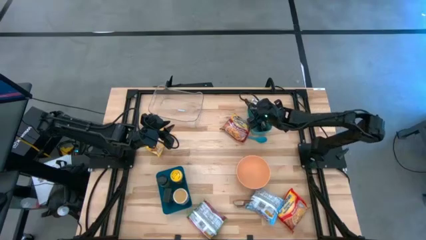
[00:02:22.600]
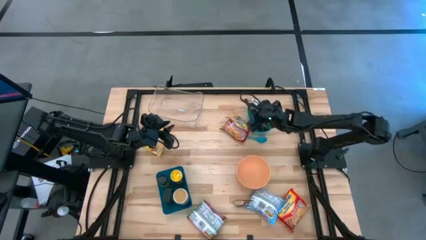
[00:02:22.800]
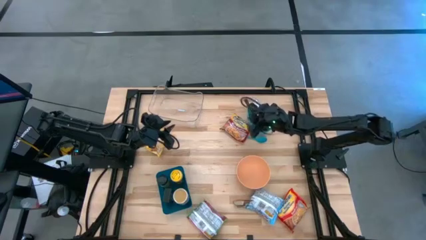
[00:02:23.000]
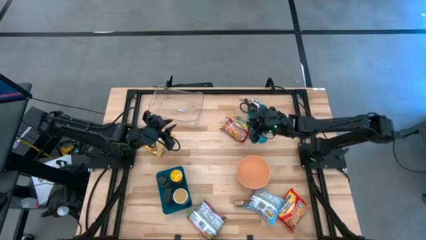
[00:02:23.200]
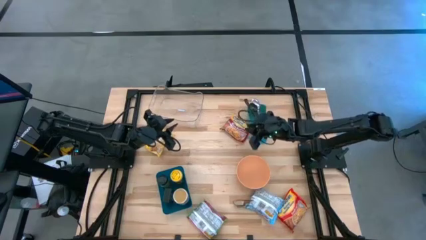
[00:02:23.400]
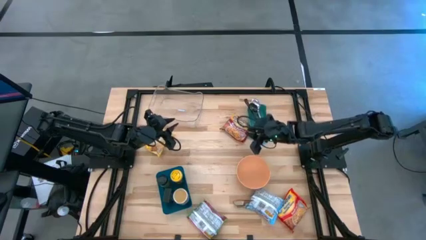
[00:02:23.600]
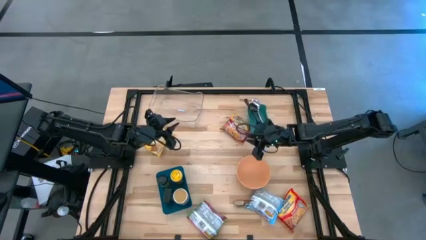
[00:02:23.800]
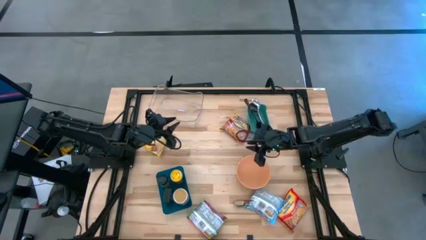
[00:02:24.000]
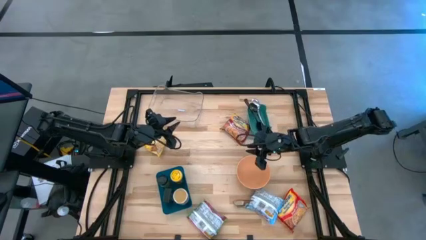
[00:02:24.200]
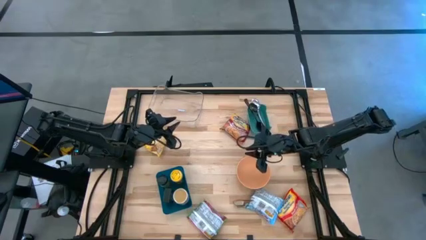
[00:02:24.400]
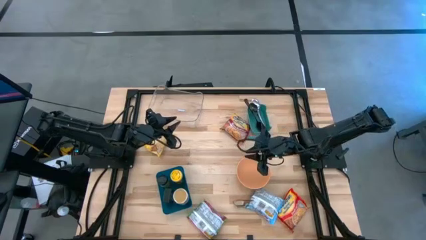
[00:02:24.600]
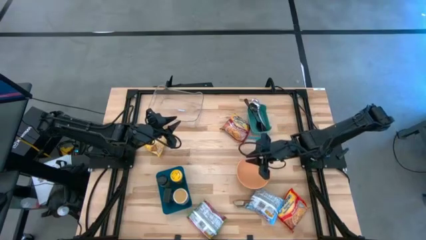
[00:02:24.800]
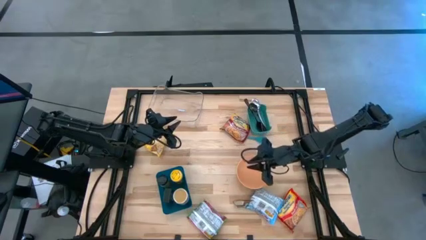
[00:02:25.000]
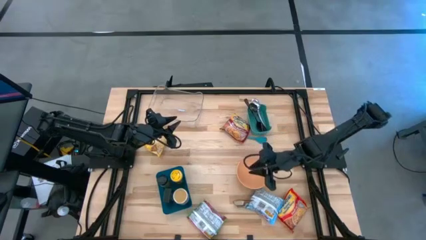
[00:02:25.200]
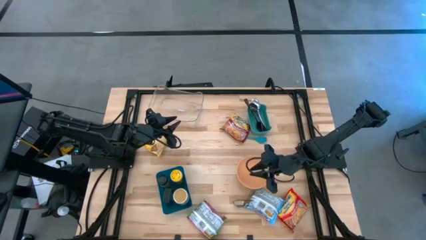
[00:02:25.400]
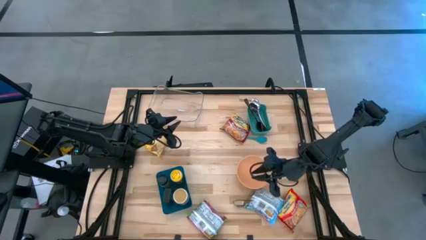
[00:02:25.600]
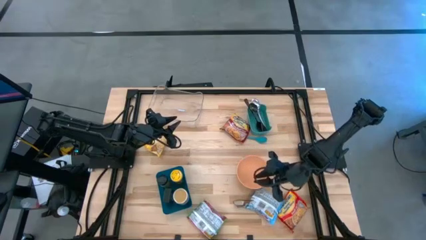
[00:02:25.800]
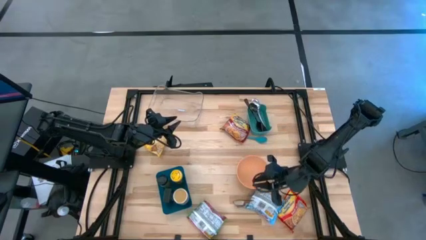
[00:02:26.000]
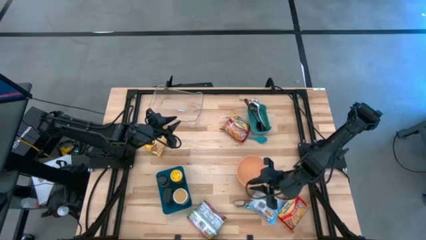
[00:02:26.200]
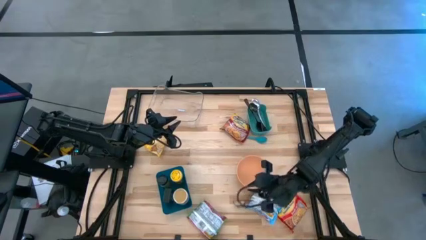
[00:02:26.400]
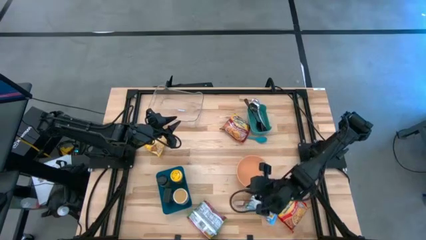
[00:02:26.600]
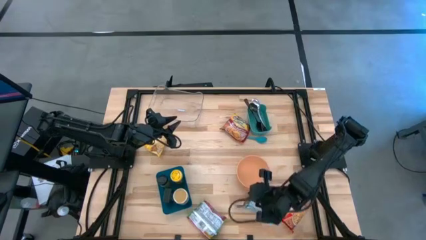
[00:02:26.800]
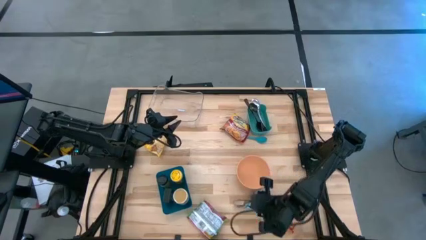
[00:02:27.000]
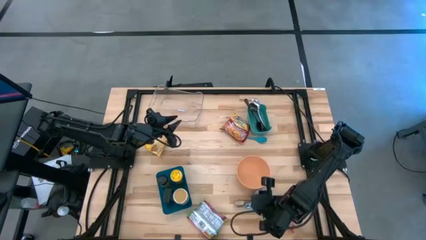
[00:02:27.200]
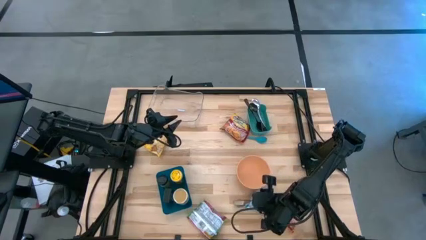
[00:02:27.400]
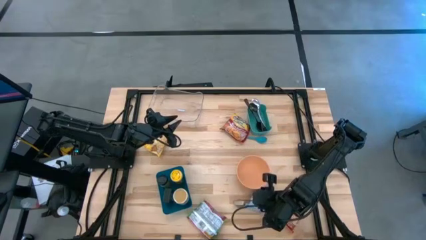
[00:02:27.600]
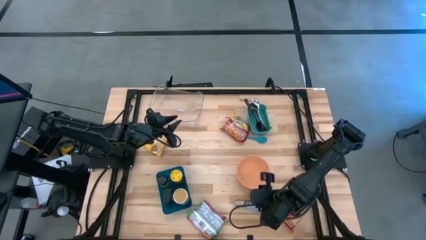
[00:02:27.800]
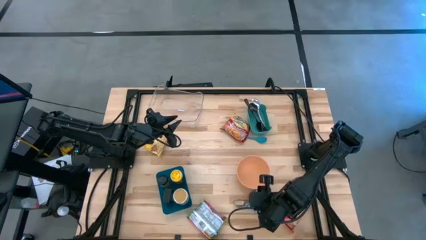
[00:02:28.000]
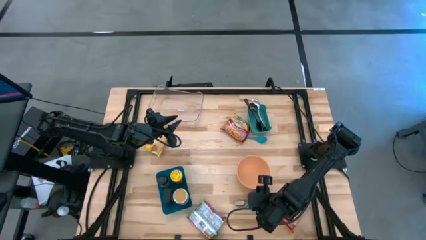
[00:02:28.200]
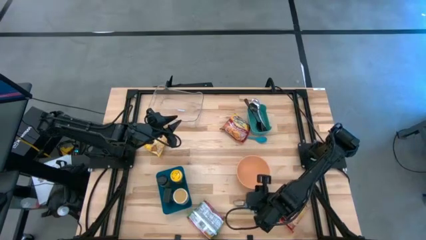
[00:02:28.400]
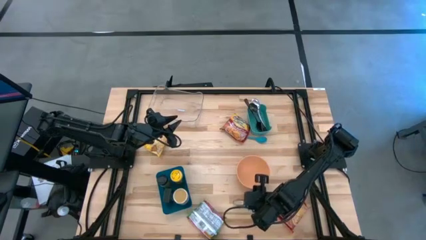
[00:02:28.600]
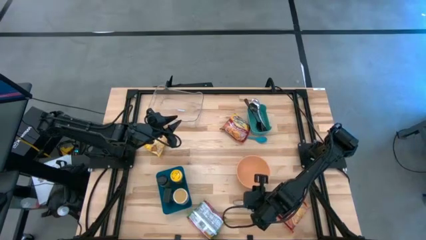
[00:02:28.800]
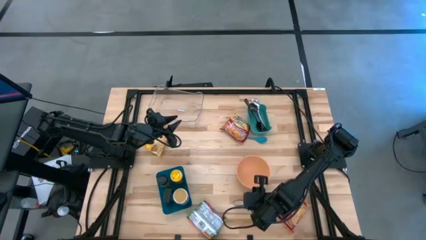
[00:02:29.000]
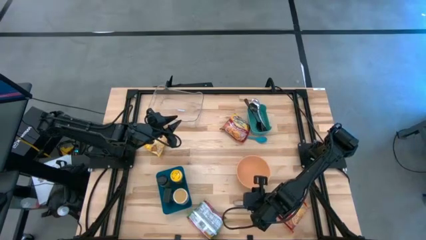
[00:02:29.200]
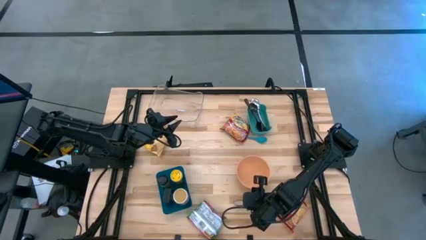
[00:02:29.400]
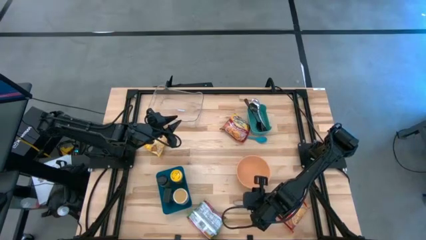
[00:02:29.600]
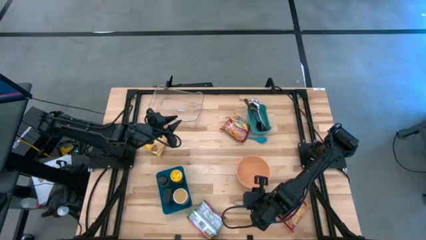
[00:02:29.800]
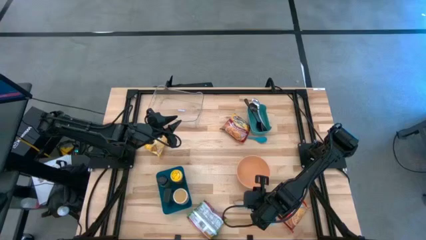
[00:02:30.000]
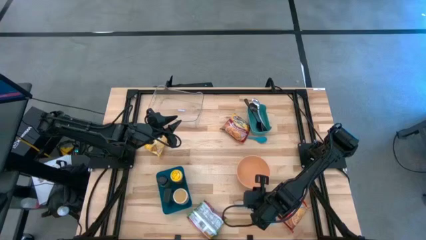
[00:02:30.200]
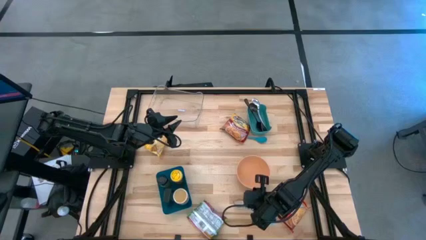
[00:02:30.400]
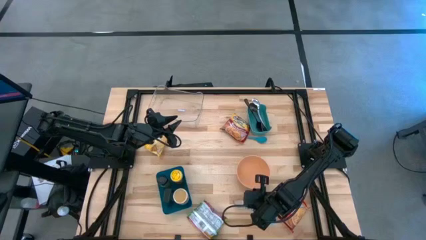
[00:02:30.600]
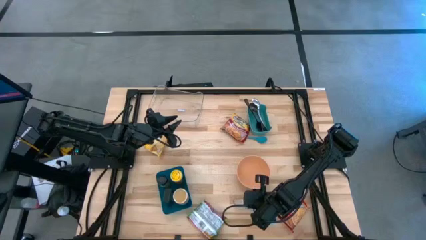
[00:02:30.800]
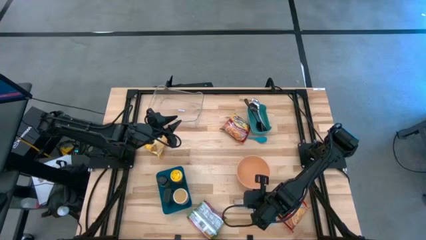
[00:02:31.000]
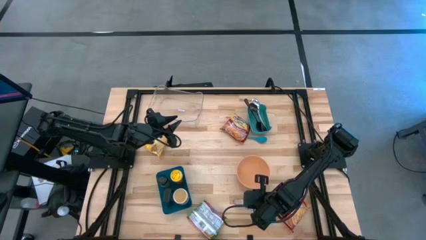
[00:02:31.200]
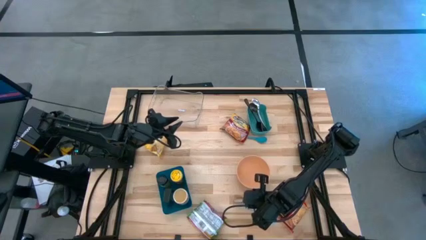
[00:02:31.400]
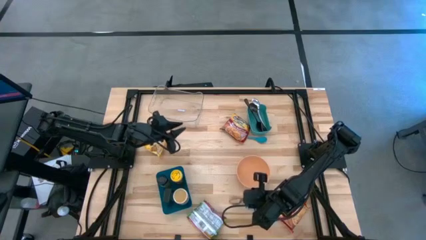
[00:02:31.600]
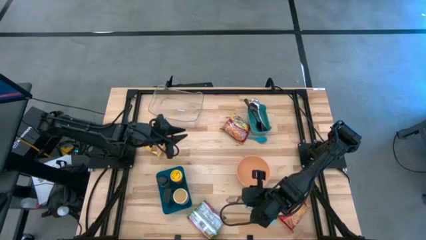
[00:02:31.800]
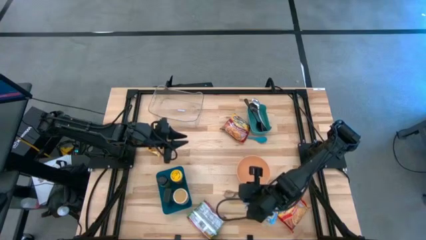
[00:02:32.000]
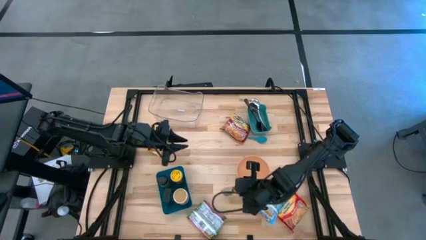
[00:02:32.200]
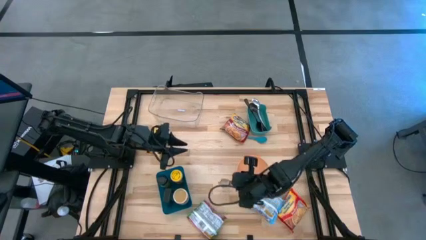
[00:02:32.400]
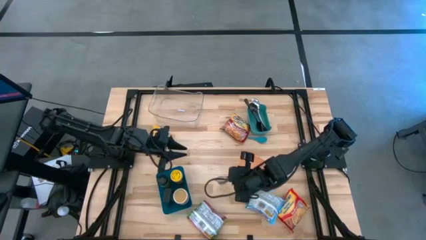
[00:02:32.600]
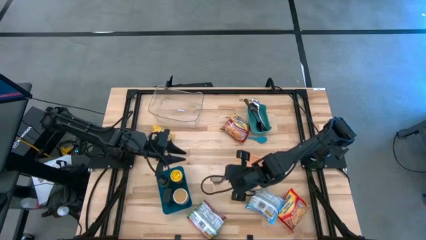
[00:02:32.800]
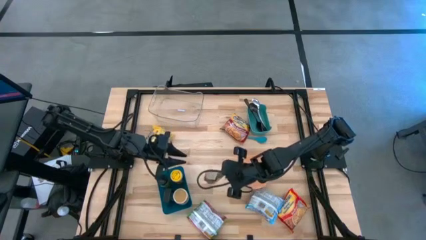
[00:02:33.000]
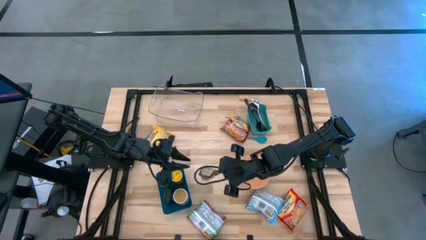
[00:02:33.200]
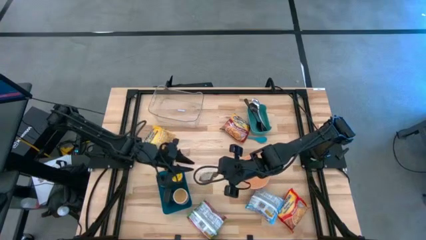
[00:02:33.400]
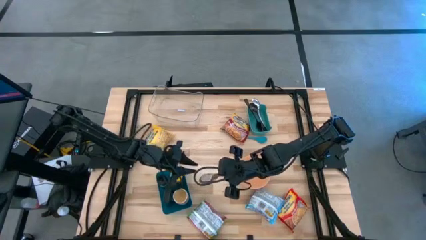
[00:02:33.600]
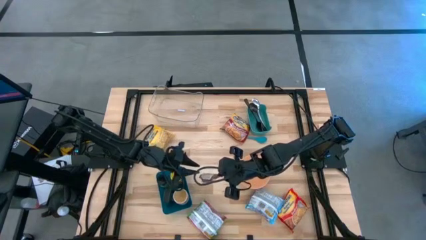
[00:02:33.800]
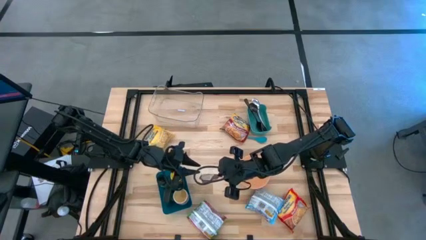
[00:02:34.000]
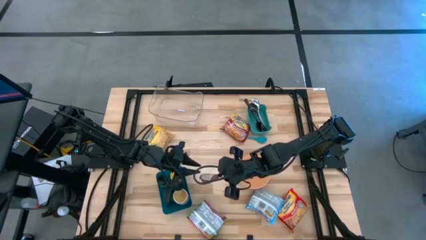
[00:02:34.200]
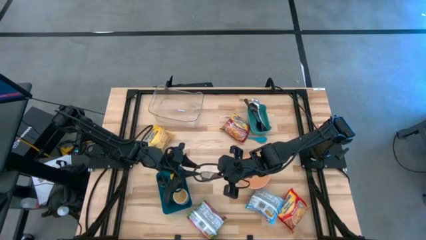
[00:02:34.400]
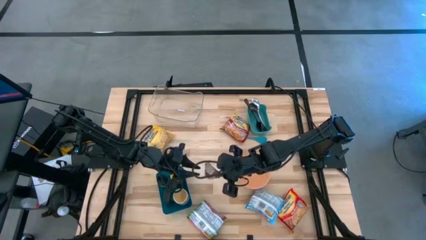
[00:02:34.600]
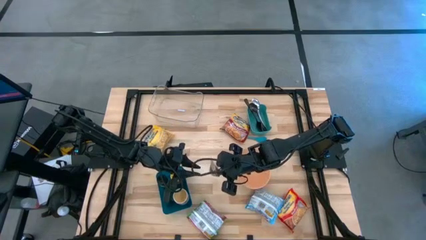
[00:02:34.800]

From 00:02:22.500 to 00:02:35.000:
Task: Pick & Place Food Item
Put the orange seasoning pack into the blue bin
